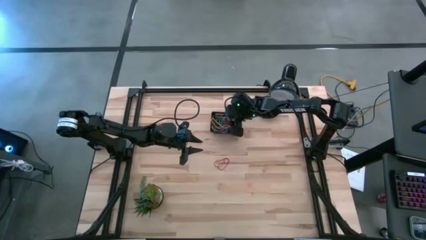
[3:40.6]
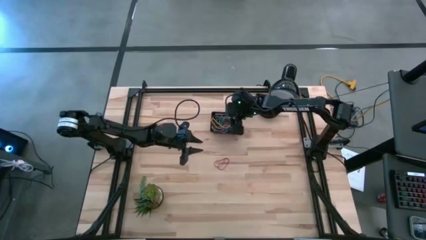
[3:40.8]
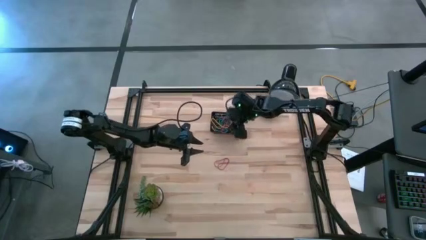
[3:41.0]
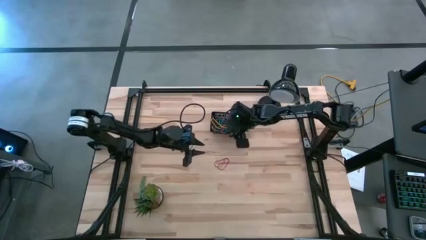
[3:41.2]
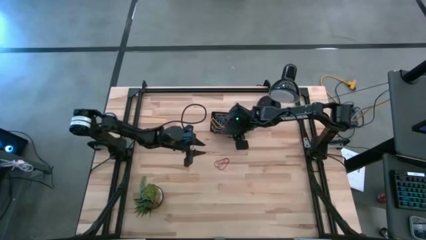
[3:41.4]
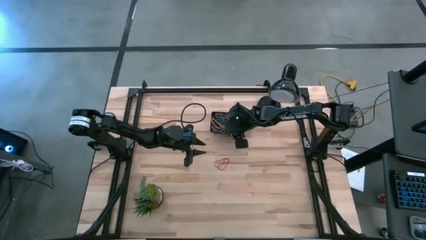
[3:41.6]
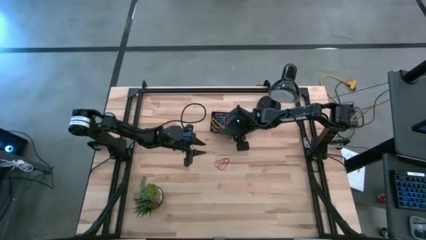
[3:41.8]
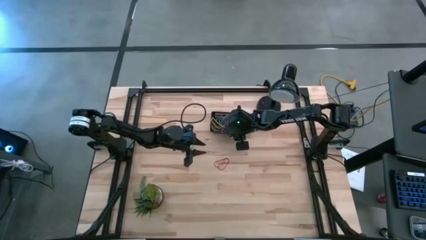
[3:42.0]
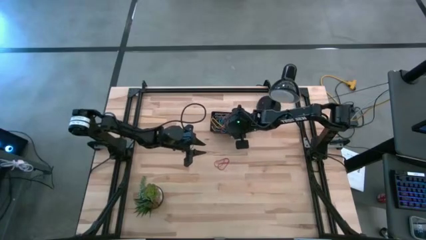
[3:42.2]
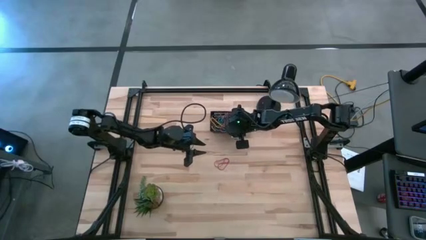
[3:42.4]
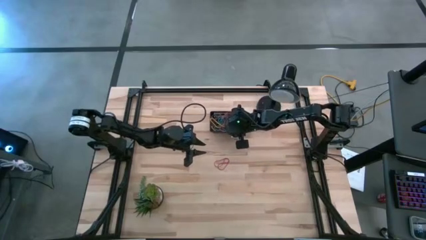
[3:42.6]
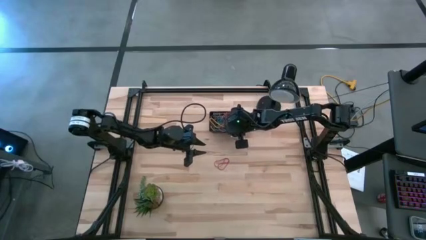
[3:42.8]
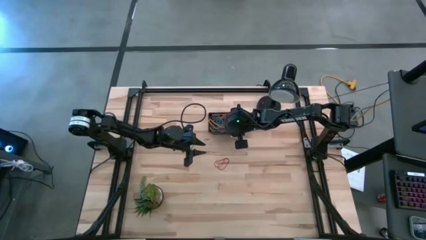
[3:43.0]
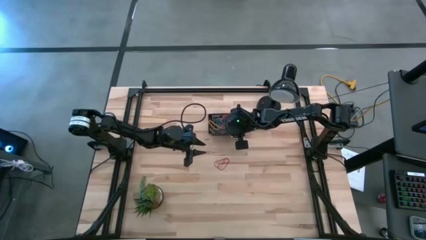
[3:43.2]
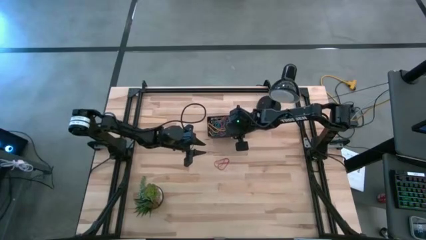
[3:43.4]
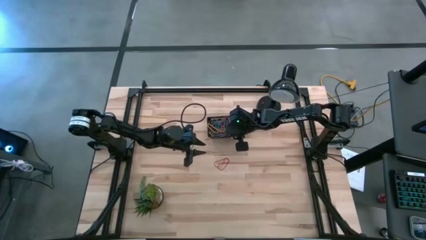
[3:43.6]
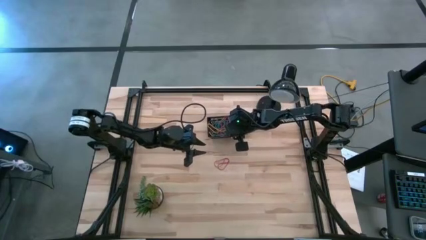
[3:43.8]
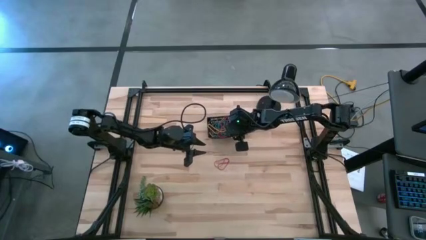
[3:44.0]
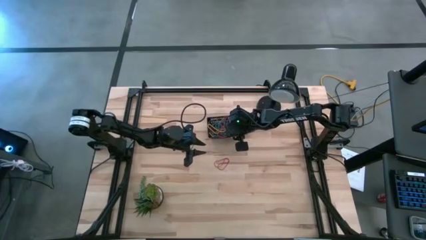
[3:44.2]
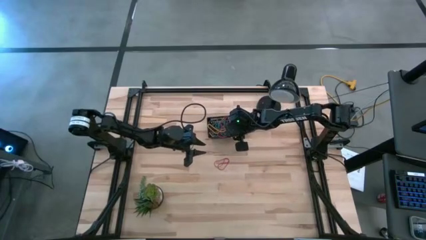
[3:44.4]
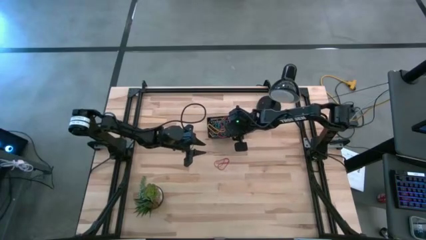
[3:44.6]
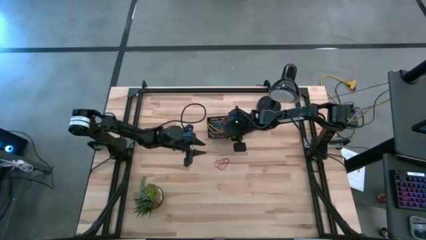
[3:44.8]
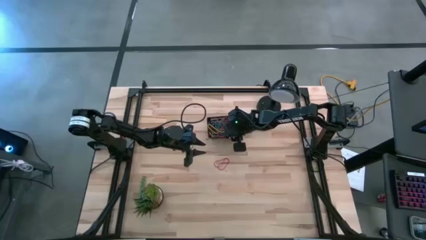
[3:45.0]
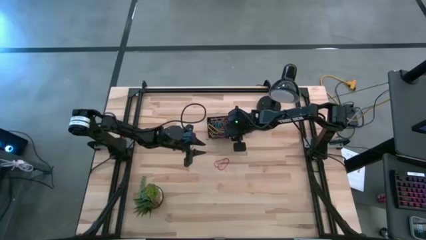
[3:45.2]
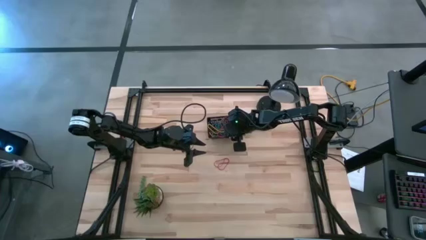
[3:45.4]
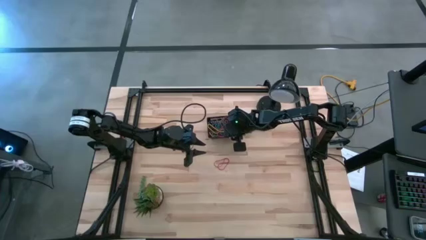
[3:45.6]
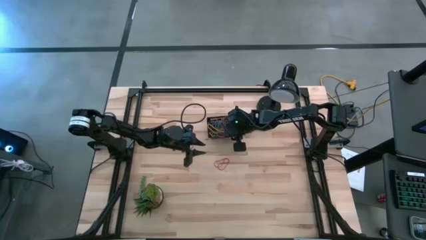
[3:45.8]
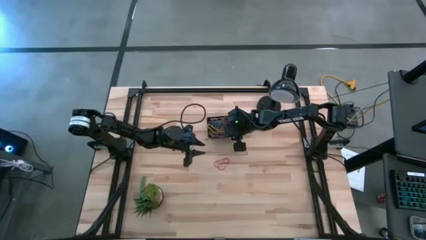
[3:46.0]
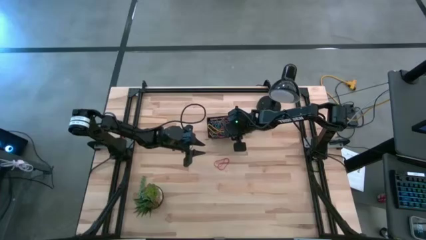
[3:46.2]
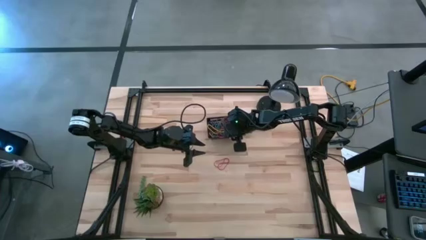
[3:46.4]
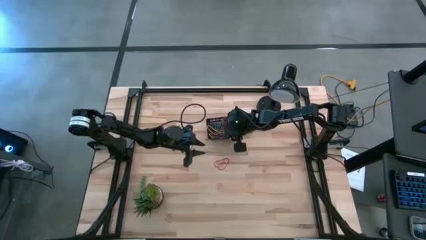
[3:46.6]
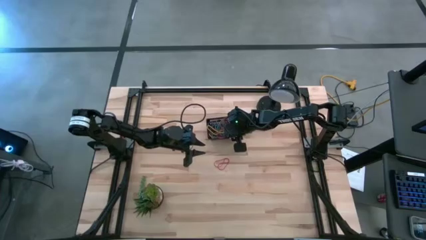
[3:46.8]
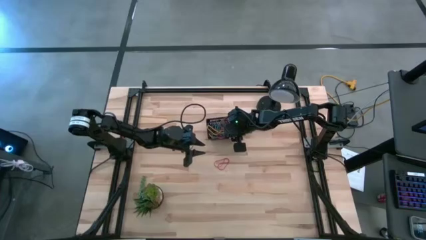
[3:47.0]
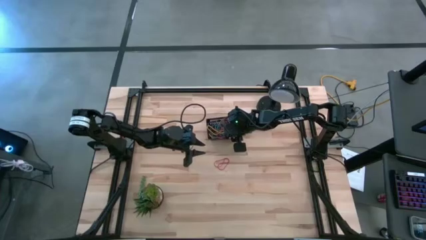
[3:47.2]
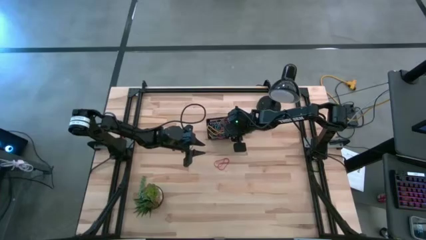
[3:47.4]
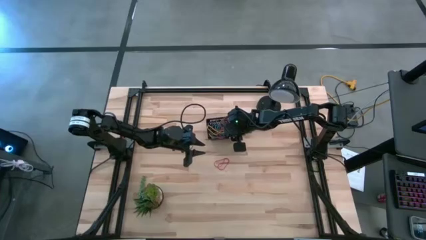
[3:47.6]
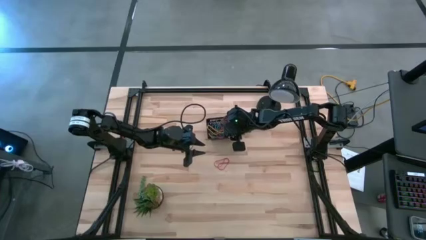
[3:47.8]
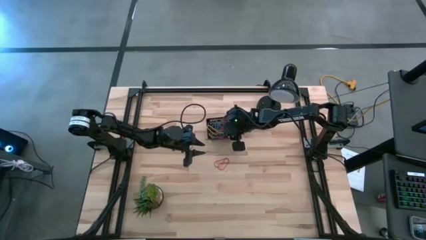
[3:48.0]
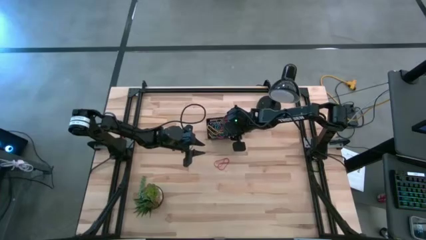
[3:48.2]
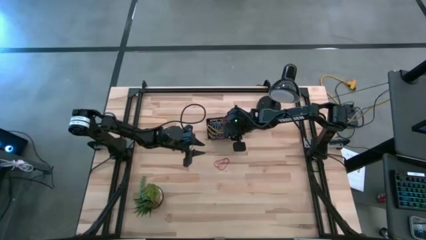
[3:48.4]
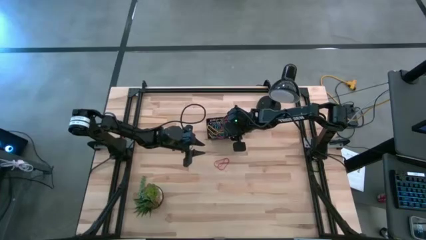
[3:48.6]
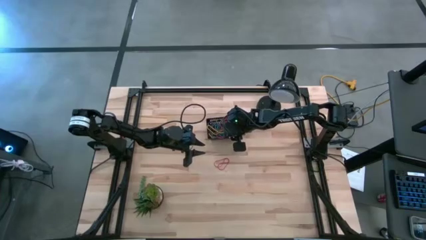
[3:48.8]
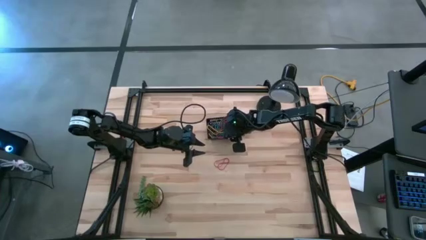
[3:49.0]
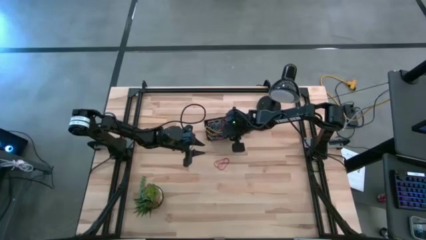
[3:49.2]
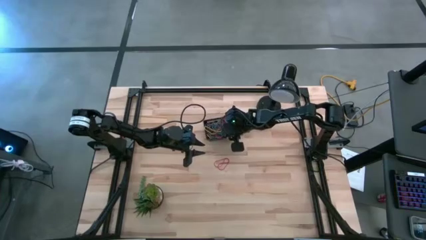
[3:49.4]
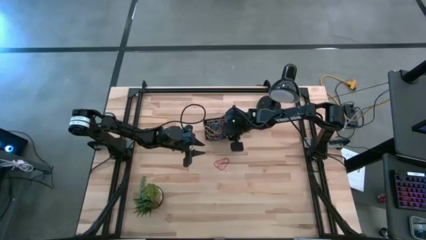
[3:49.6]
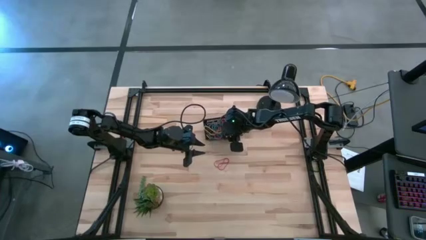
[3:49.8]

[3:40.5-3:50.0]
Task: Pick and place rubber bands into bin
Adjust the basket

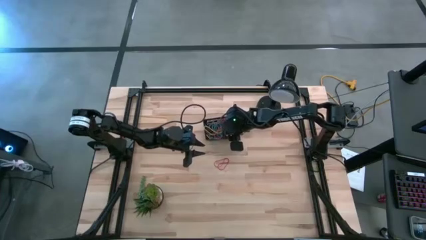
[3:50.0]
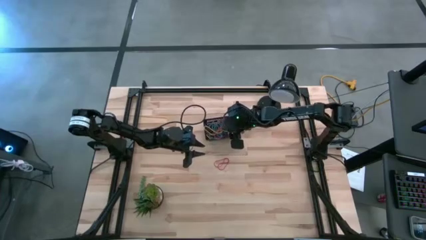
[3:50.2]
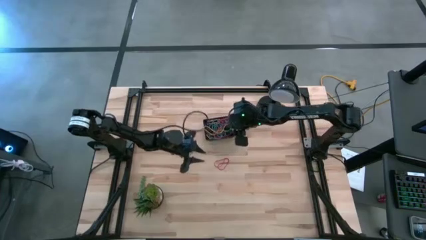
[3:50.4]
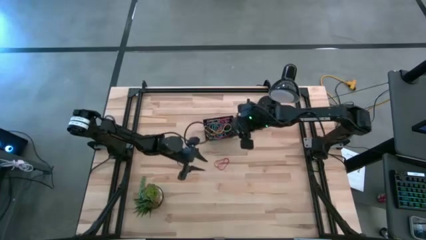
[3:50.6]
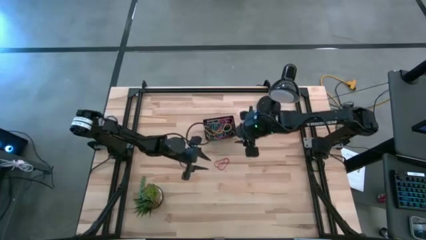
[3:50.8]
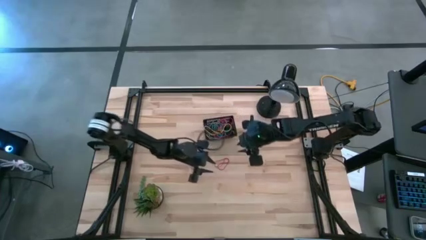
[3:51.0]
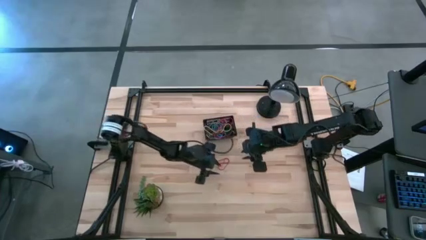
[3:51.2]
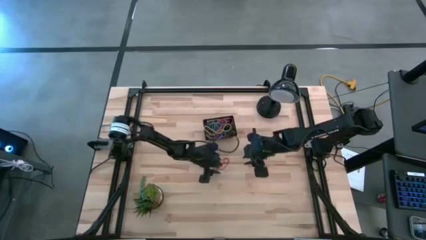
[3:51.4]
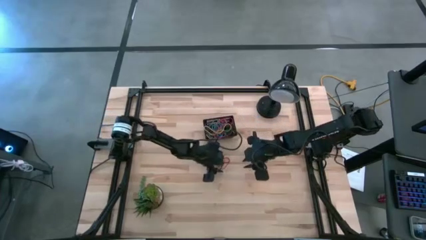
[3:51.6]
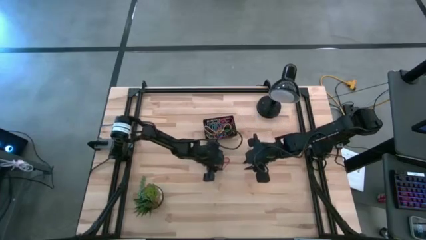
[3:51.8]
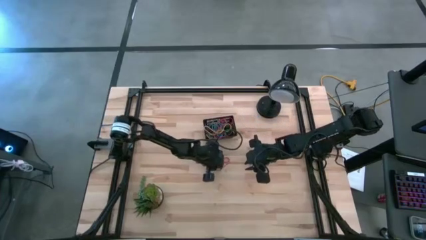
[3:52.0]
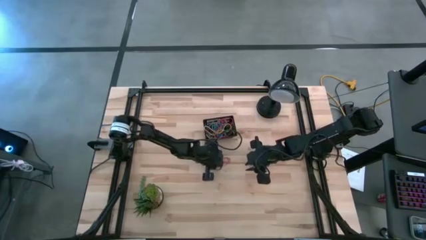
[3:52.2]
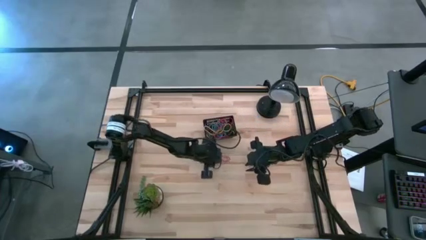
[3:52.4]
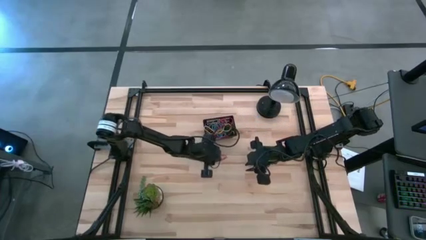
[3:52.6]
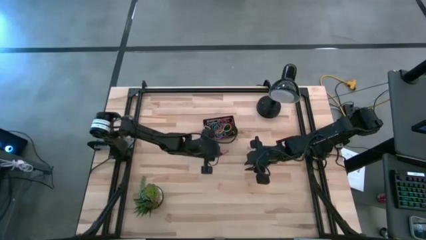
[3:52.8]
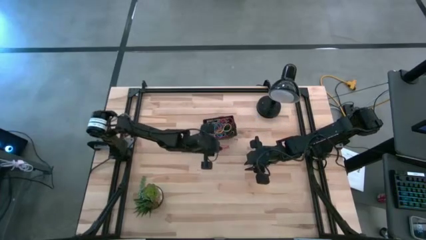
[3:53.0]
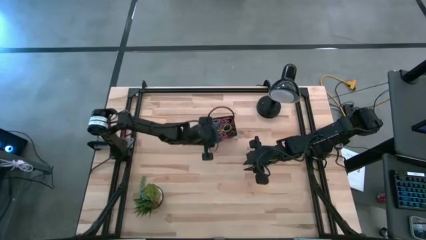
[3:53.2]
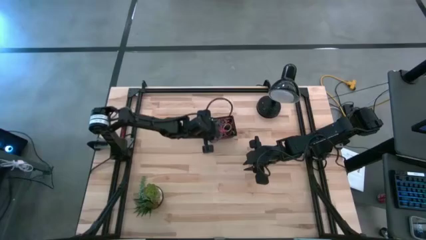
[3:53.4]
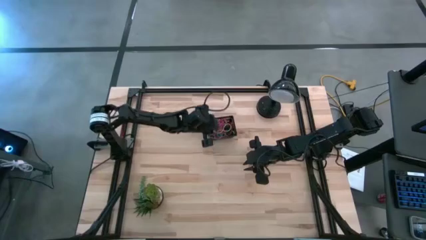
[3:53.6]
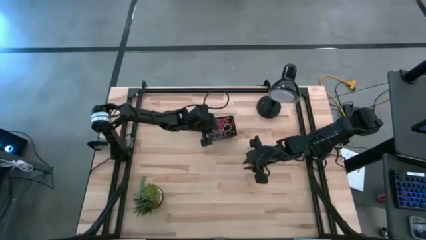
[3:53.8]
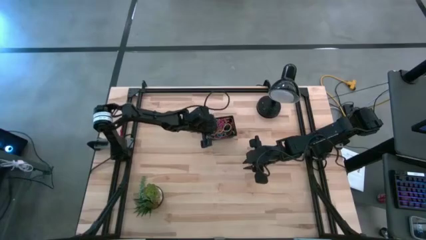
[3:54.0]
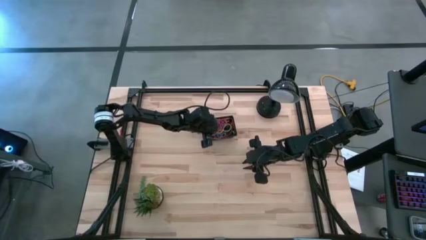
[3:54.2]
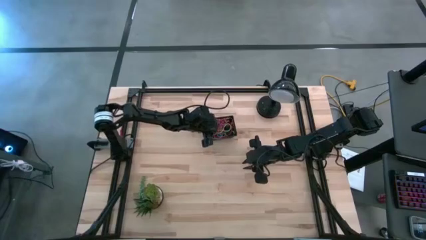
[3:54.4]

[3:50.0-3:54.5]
Put the red rubber band into the basket
